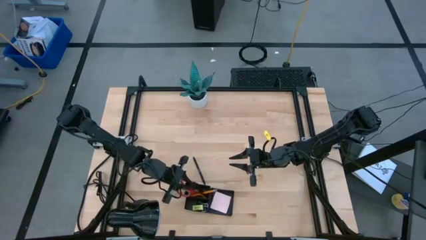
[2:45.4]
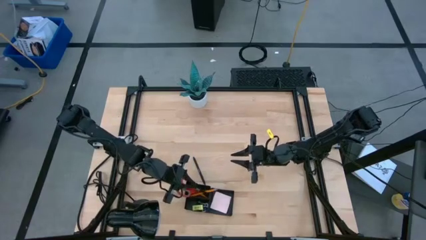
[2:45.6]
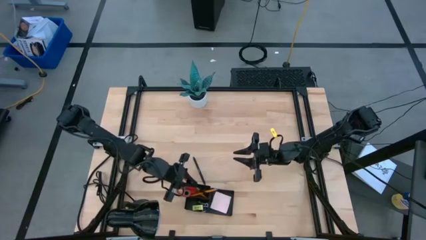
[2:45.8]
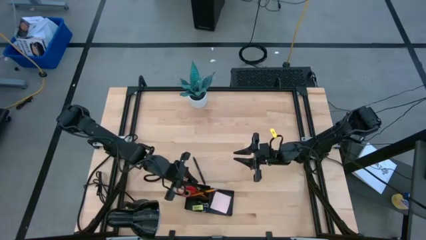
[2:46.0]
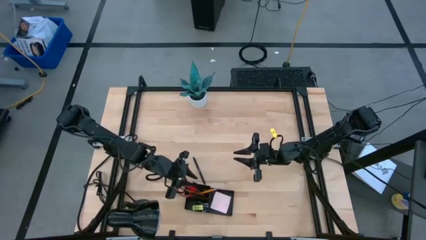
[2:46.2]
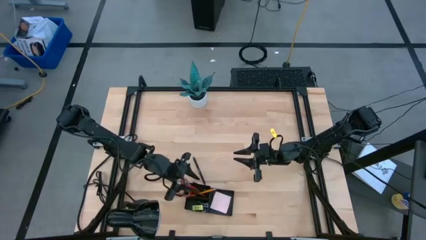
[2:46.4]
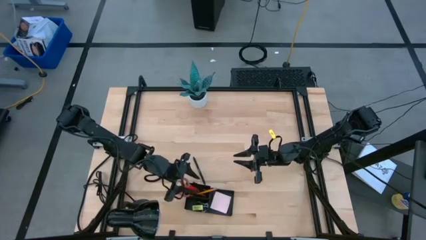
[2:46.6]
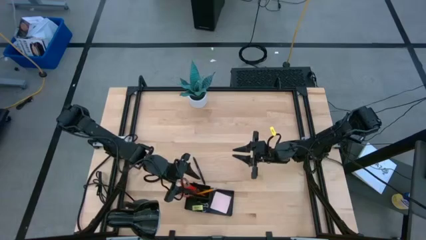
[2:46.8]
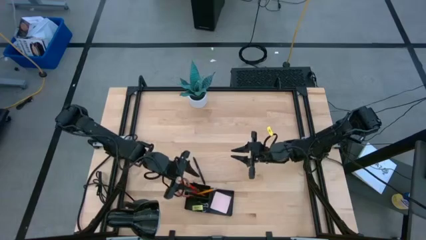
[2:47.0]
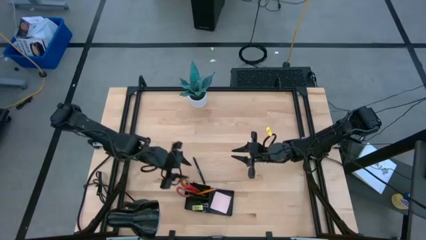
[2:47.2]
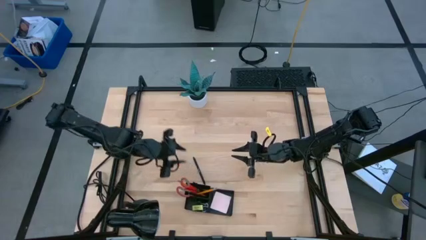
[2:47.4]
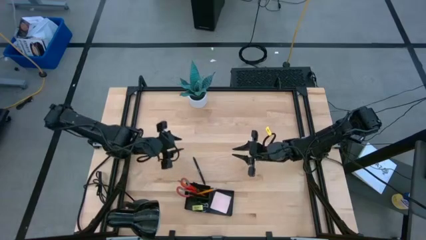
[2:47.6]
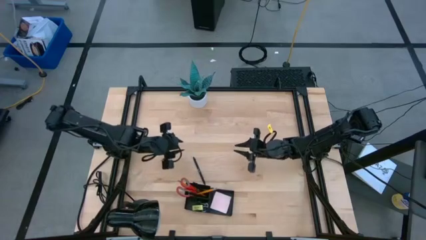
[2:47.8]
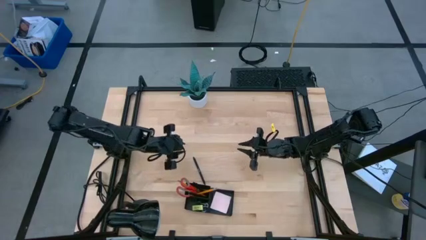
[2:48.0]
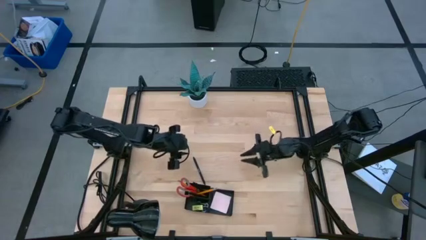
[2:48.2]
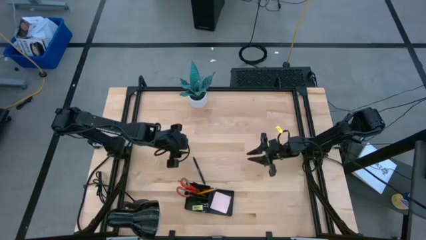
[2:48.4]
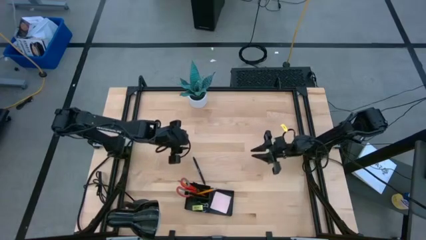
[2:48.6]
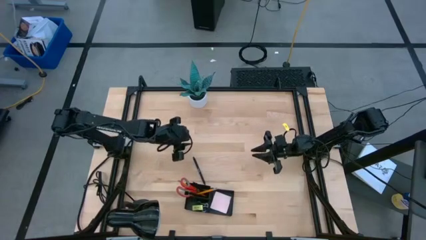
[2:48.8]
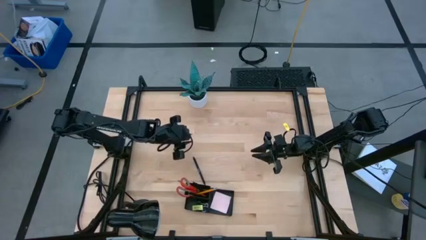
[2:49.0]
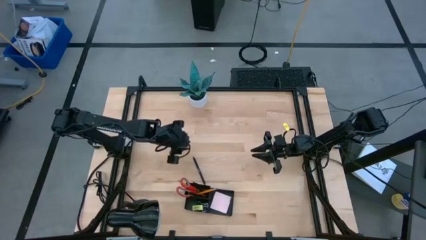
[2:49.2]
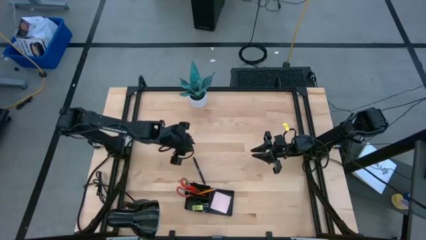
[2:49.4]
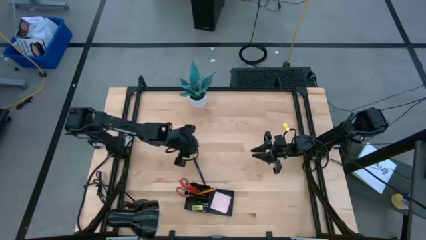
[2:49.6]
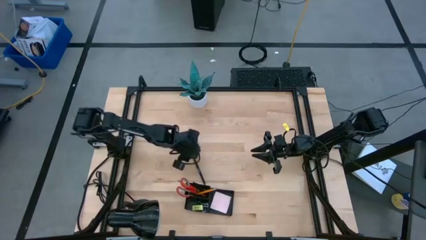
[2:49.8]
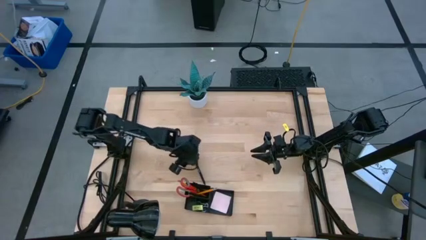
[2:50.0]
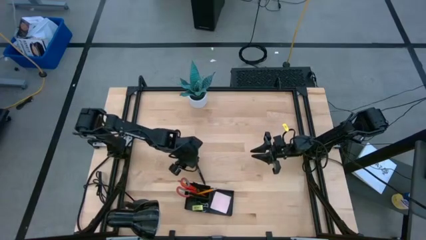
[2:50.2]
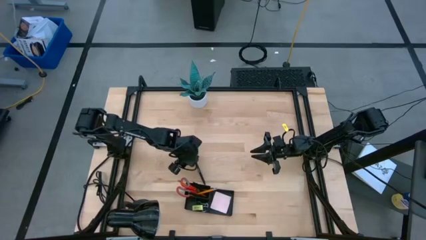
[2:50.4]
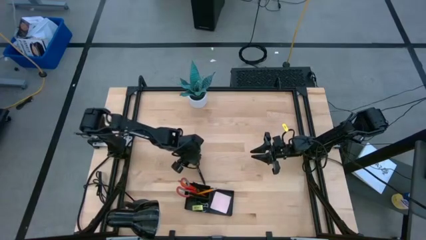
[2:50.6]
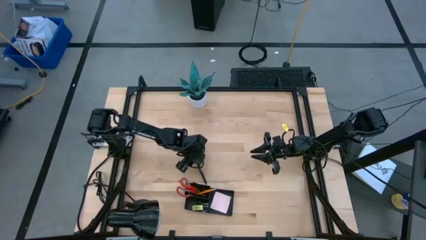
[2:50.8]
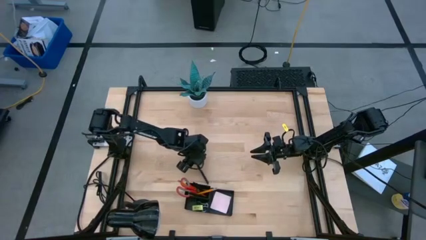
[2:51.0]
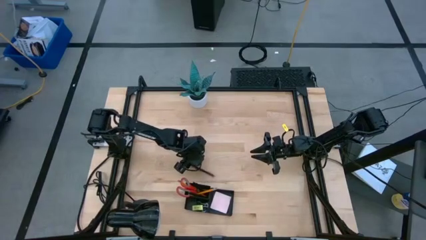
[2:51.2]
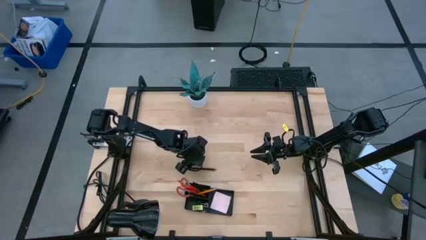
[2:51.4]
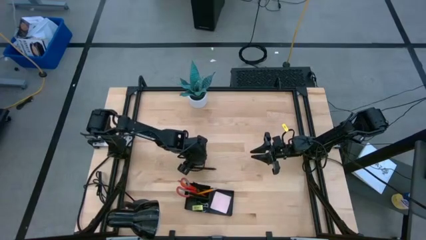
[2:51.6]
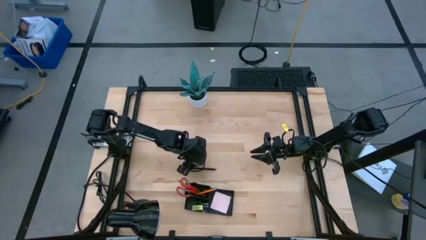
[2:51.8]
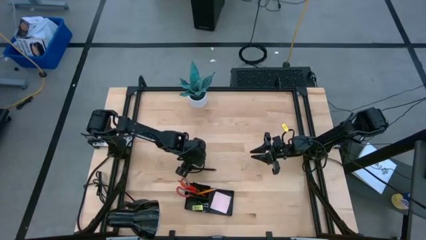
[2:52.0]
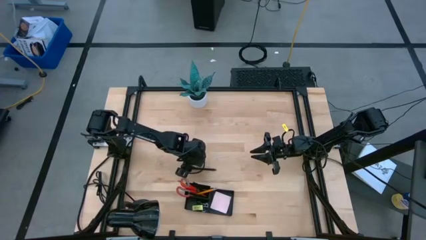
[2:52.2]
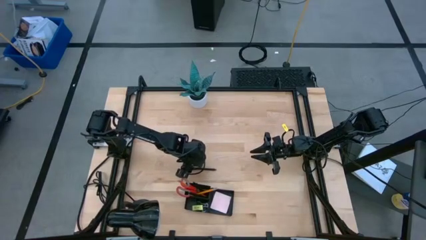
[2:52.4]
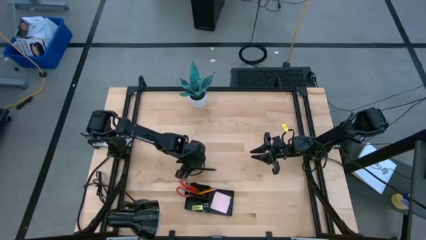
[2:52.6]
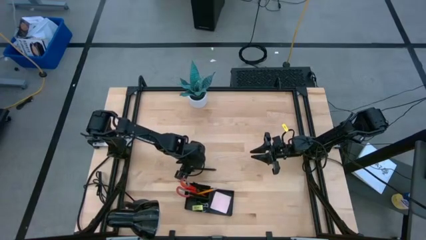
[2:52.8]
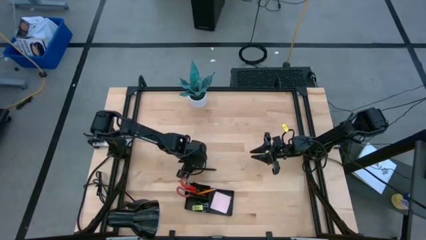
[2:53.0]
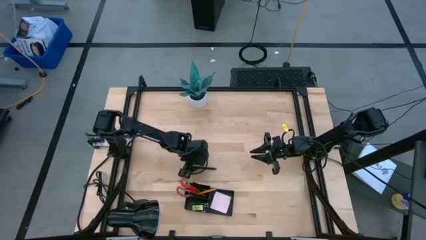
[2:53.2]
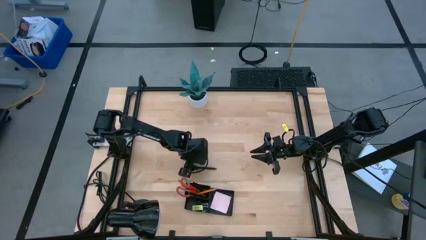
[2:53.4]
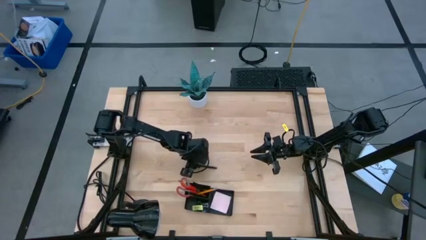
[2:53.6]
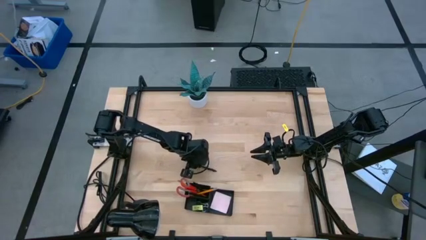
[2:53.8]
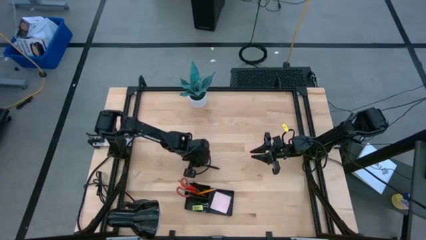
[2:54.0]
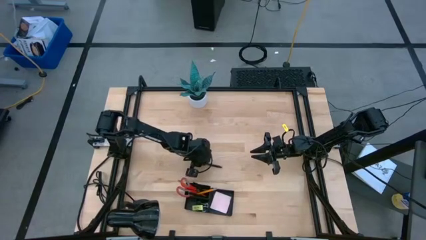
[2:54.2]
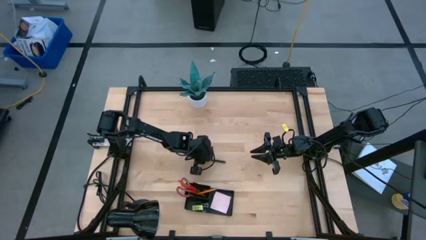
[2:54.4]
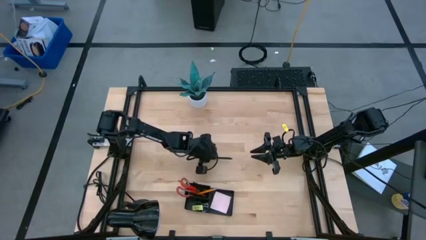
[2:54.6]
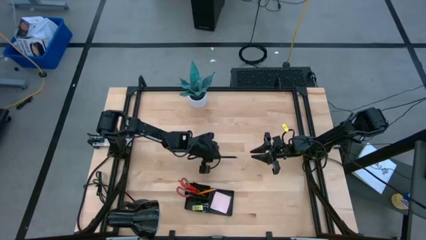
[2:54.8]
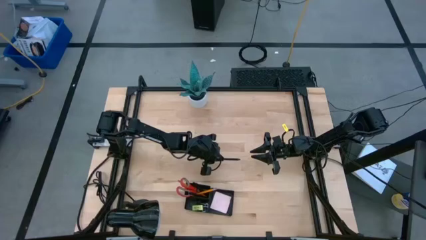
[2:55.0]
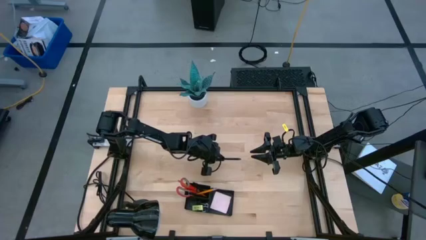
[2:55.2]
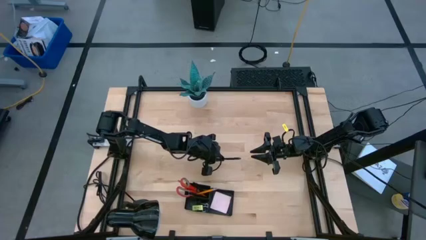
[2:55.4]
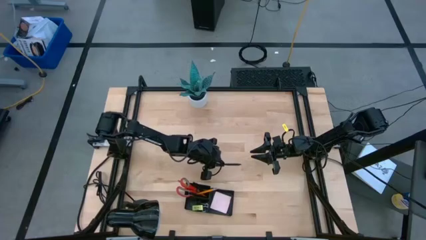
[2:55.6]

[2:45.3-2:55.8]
Task: Pick and place office supplies into organizer
Put the black pen into the black desk organizer

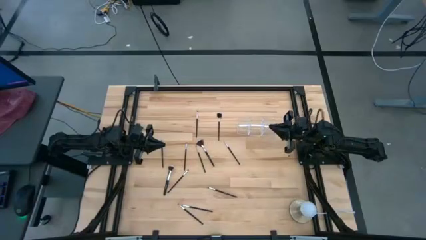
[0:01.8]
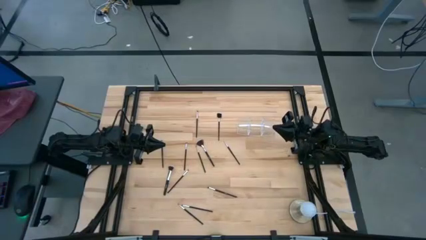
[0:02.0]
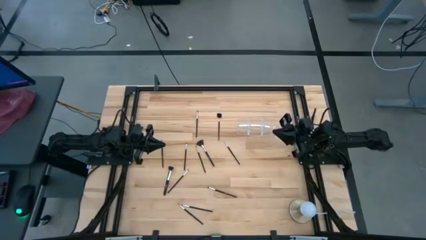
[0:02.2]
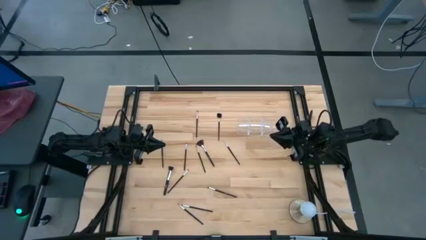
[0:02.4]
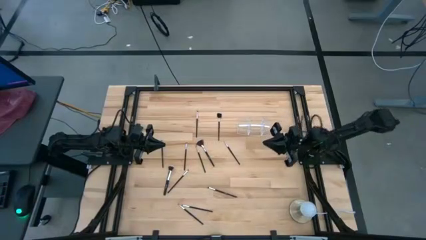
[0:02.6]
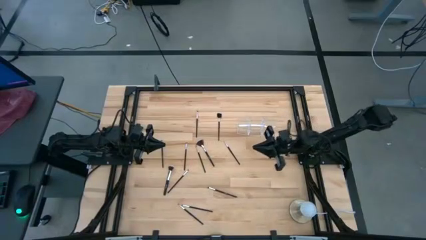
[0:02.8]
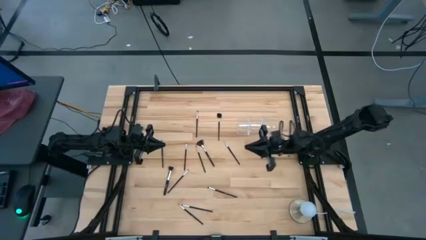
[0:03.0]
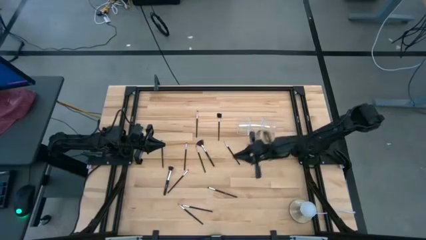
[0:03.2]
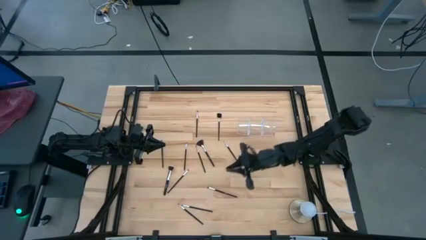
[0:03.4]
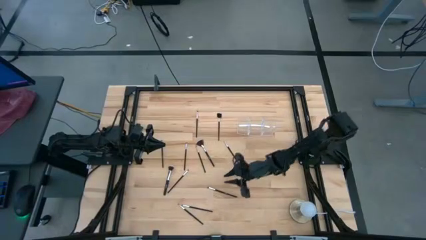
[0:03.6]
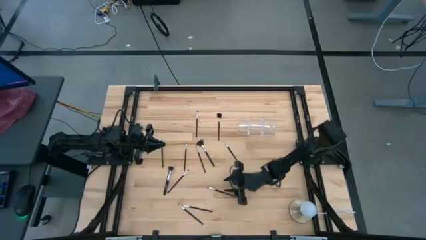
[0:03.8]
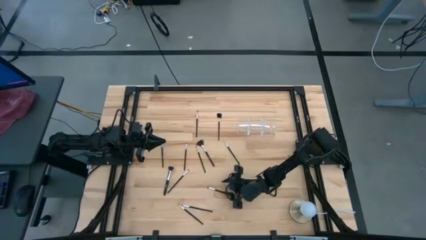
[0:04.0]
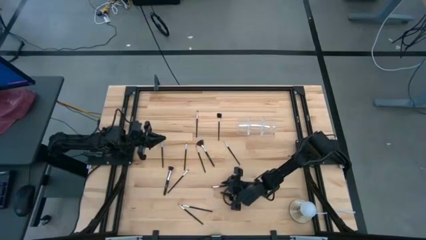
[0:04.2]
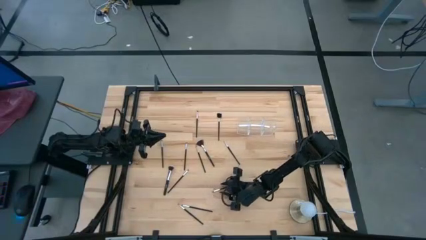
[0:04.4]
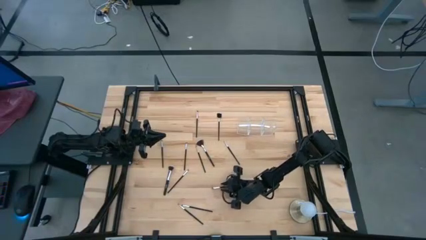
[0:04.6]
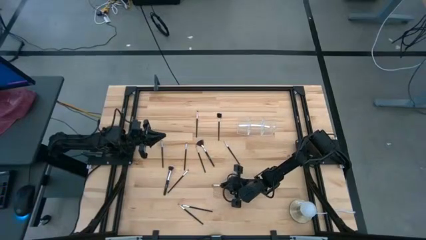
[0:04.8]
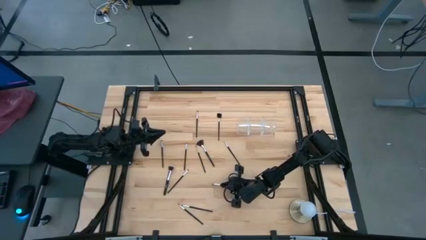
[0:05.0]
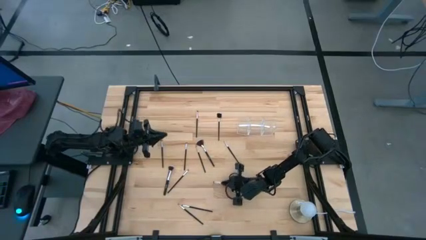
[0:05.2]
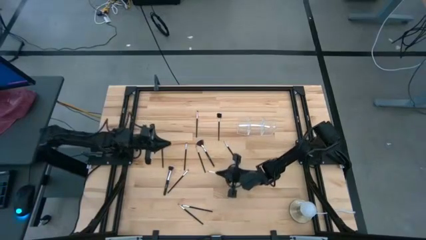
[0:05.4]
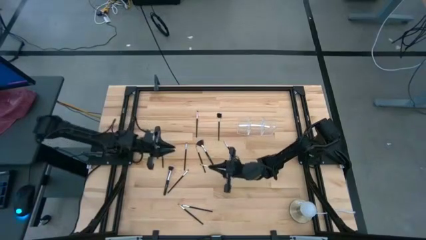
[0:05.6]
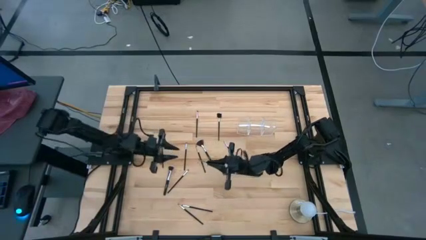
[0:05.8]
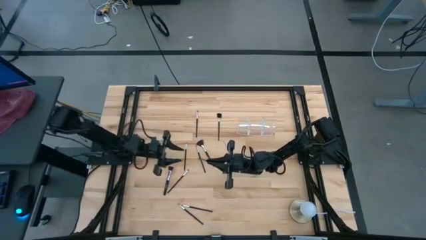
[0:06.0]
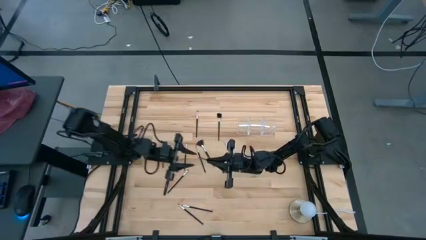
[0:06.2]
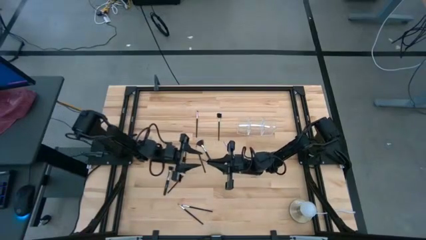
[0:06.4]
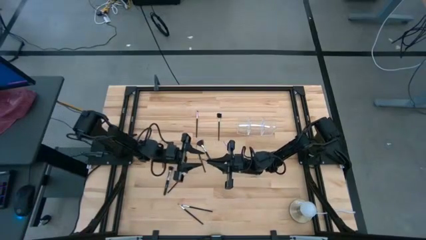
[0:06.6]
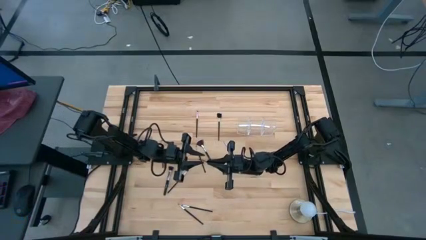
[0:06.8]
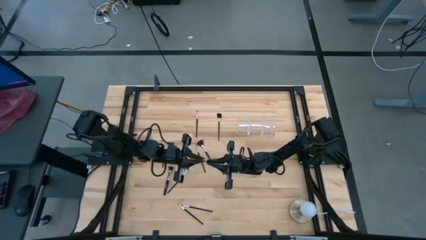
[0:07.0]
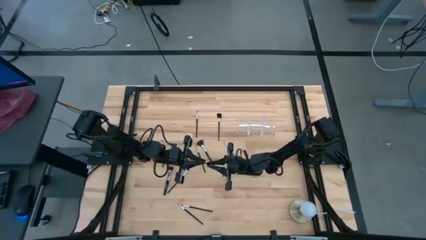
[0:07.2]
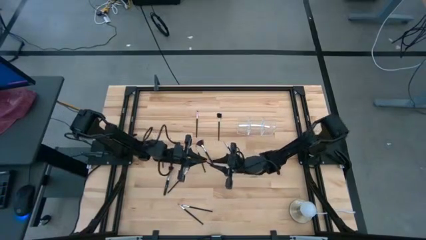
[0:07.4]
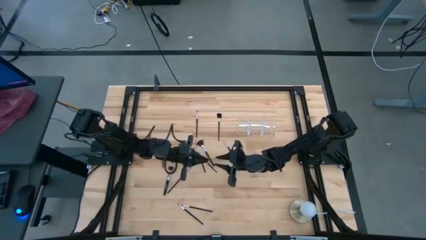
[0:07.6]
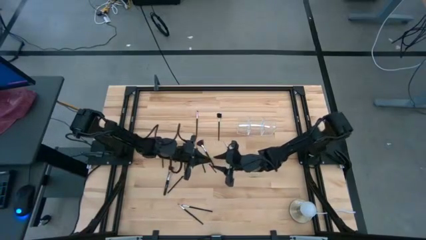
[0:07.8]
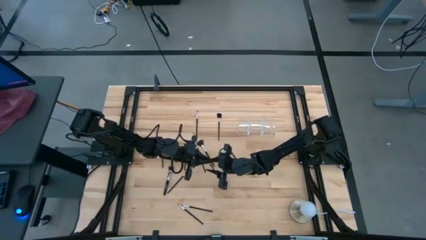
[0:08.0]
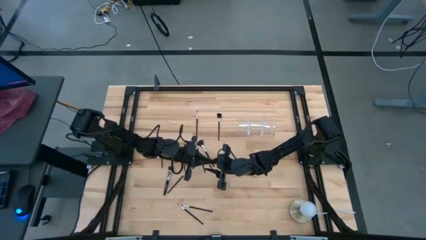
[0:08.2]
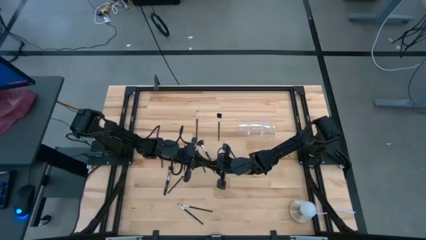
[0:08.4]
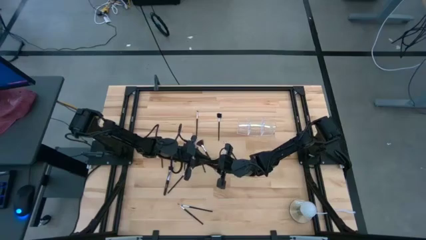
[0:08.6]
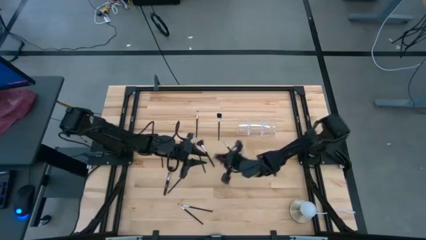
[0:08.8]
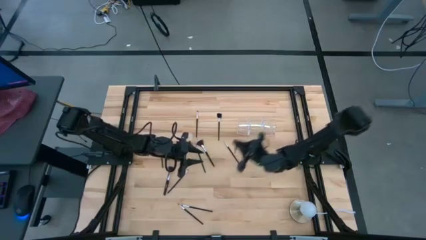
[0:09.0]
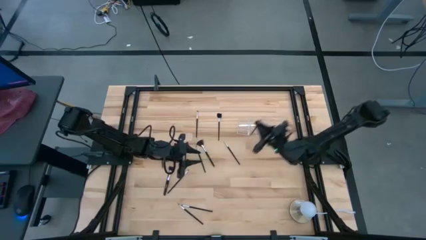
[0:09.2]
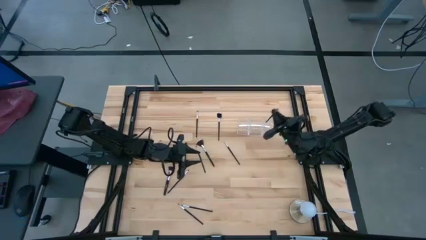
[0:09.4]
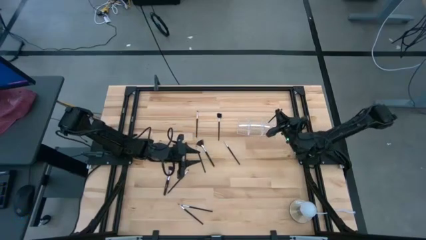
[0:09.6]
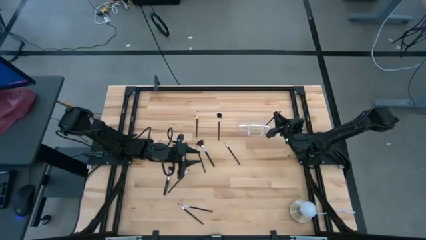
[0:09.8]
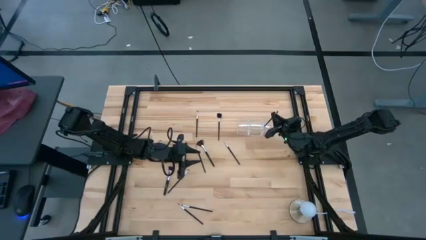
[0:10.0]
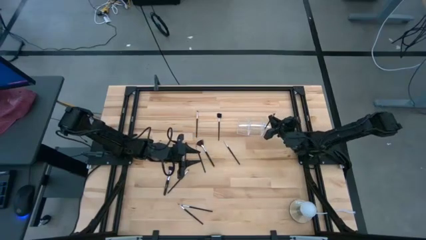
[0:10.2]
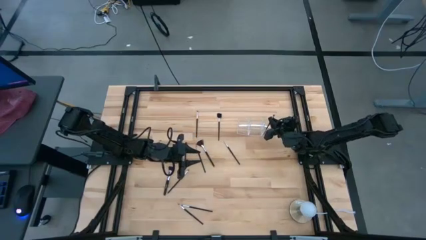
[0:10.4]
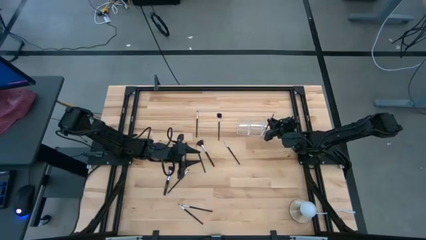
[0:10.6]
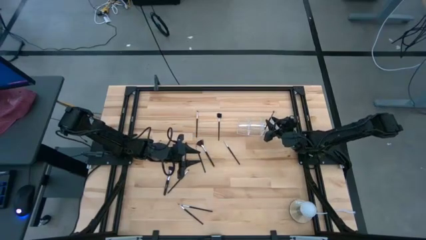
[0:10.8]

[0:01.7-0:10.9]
Task: Put items in baskets/containers
Put the black eyeshadow brush into the transparent organizer
